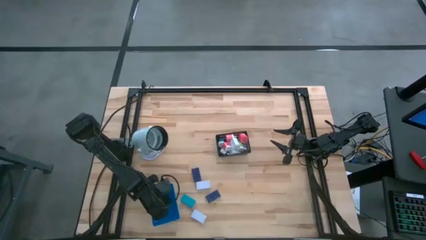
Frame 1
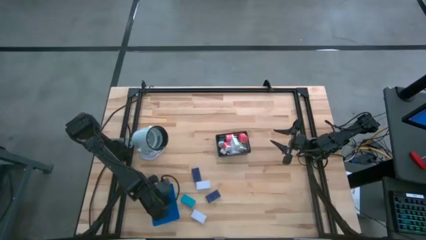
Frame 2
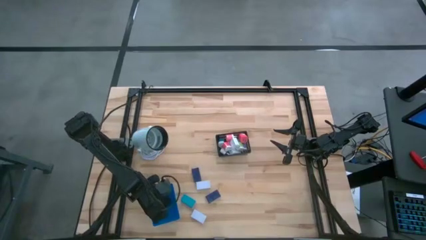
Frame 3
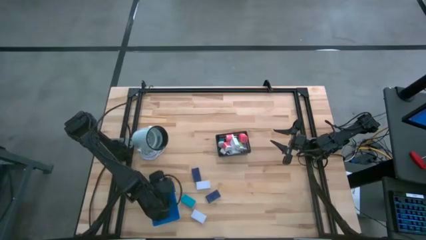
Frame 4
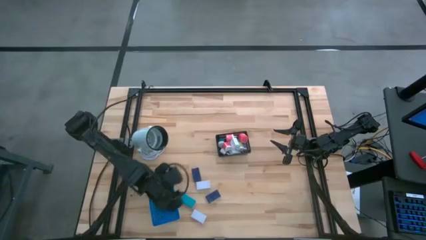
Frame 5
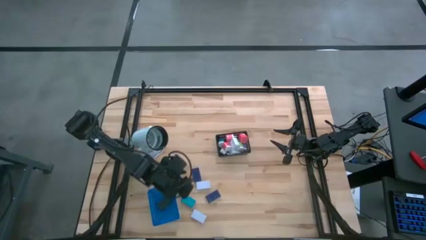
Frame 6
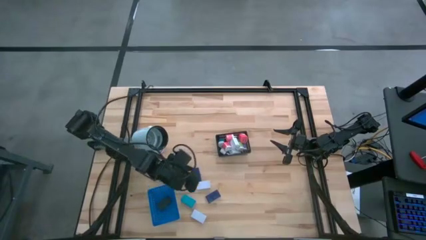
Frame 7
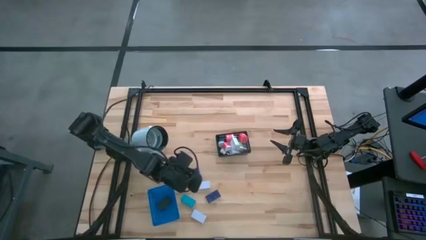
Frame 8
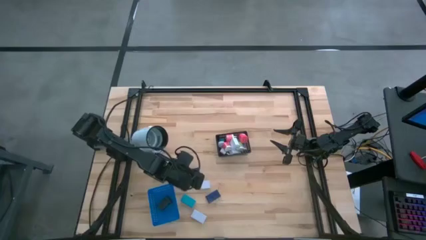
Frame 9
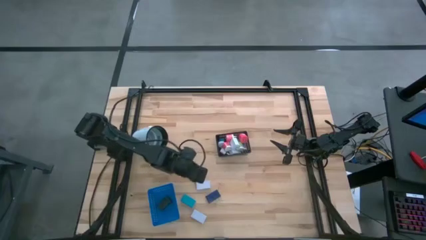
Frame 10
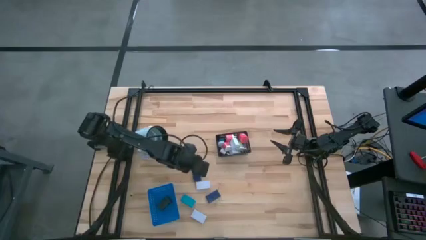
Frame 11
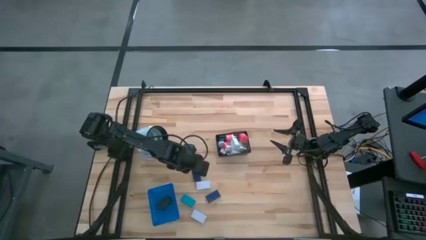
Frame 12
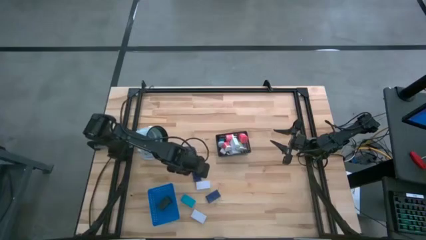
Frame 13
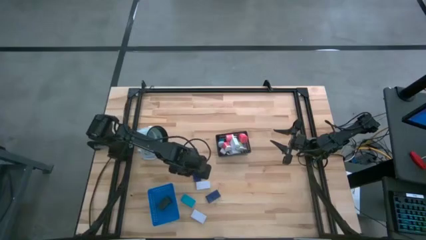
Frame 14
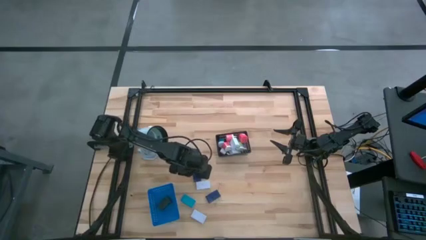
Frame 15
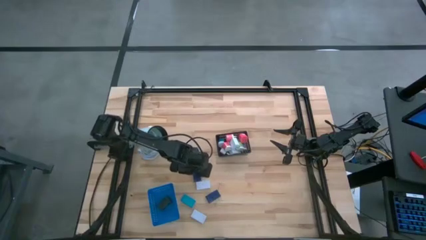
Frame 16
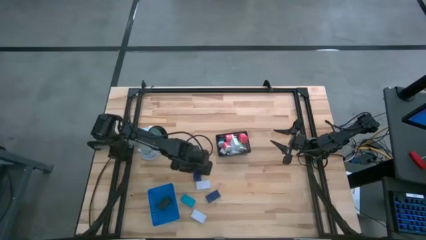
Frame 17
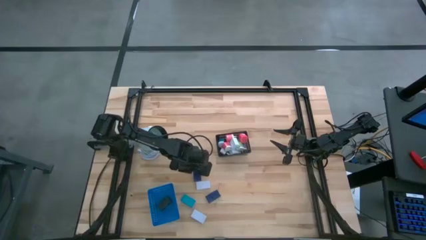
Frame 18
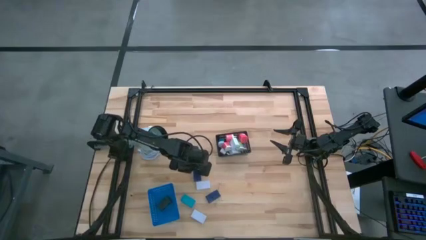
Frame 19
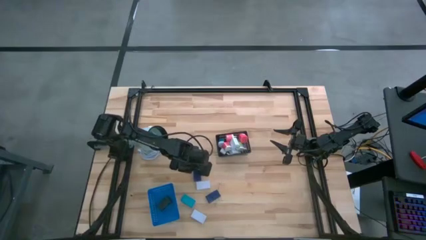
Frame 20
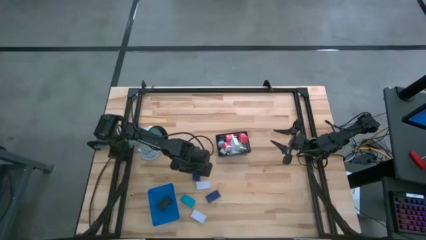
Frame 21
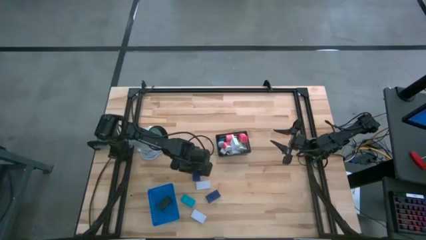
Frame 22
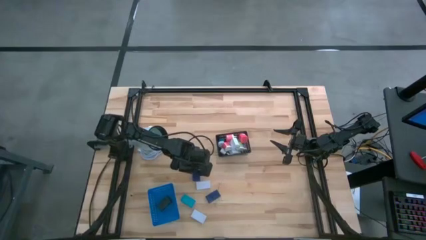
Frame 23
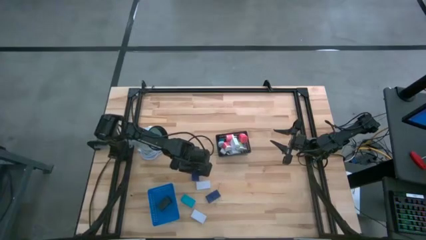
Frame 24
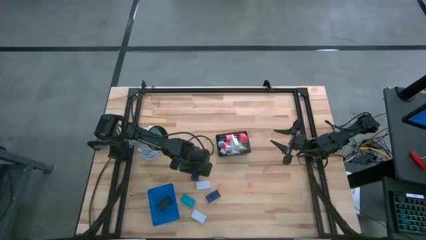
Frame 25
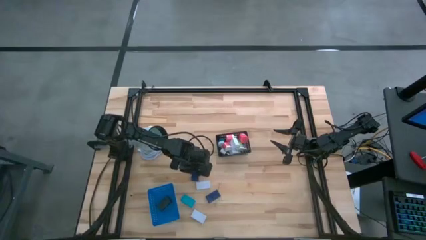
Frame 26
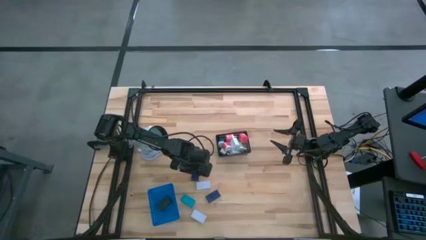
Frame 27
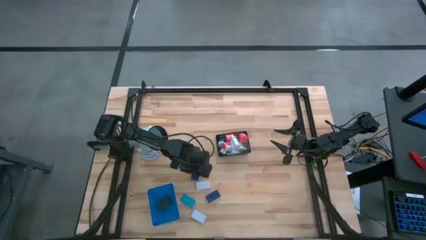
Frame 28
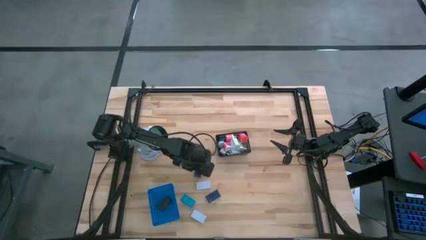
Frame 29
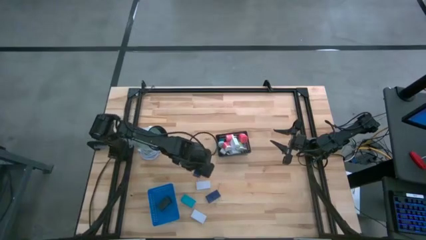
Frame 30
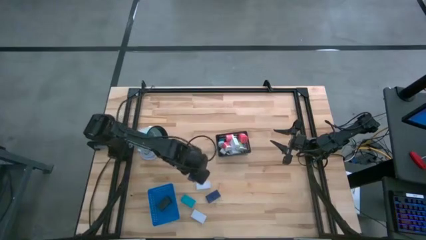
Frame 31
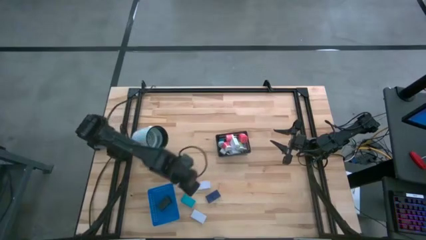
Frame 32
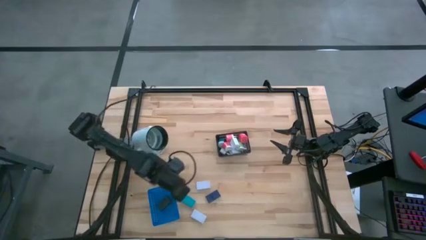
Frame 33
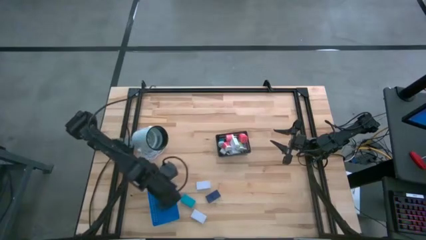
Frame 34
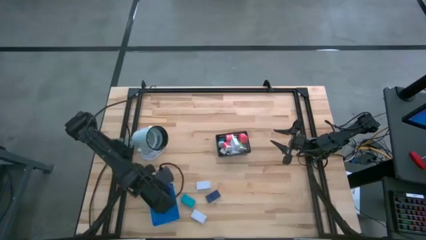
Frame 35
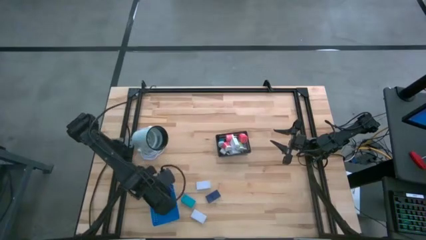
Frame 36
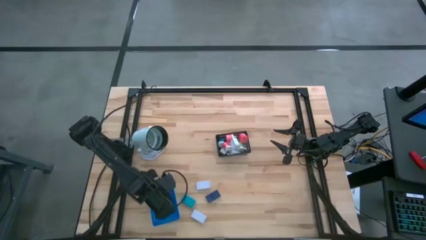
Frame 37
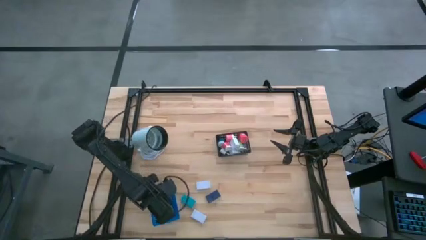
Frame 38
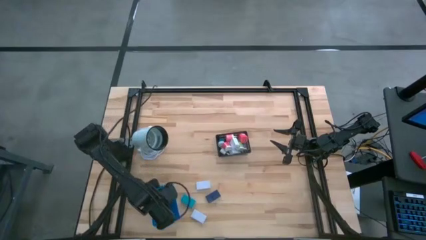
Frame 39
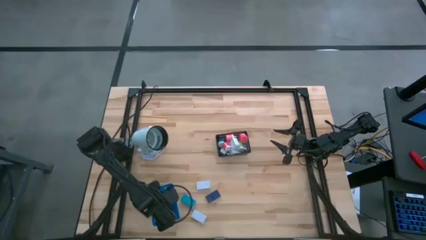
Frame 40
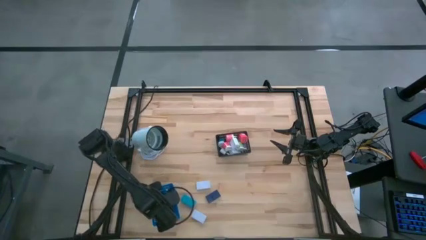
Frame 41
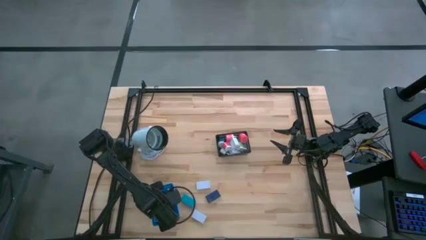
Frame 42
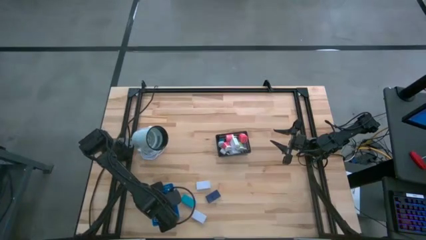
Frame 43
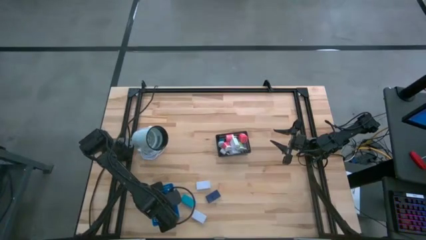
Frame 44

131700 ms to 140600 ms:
Task: Pick & Place Office items
Put the top blue digital timer into the blue bin

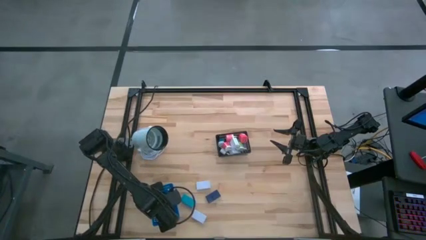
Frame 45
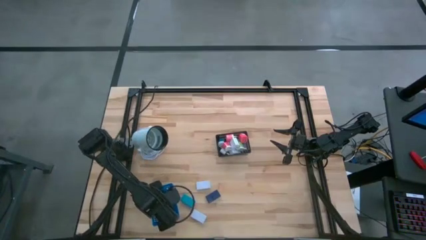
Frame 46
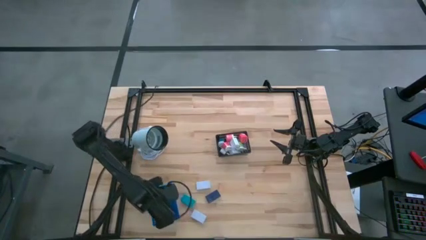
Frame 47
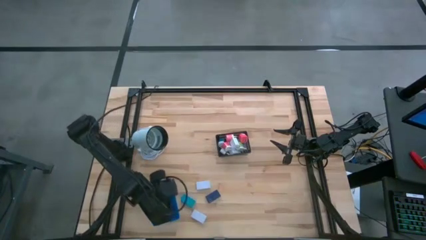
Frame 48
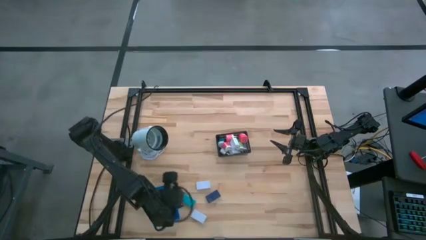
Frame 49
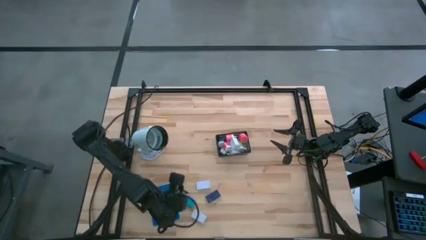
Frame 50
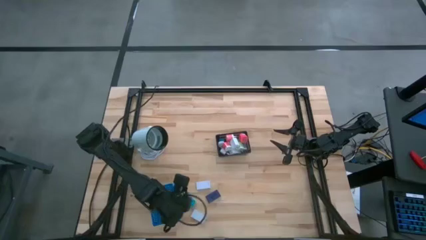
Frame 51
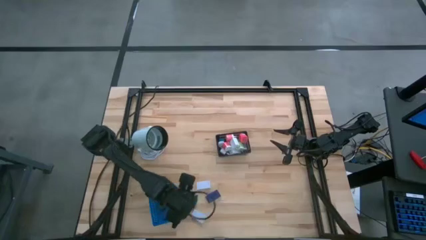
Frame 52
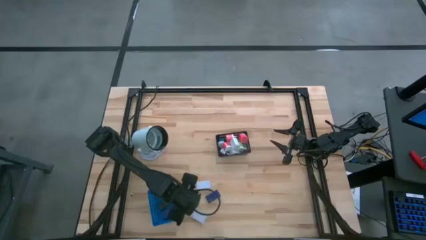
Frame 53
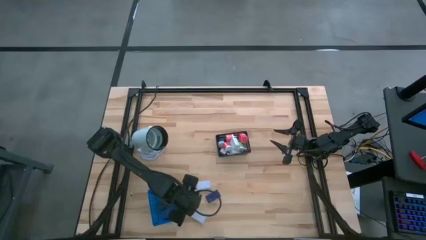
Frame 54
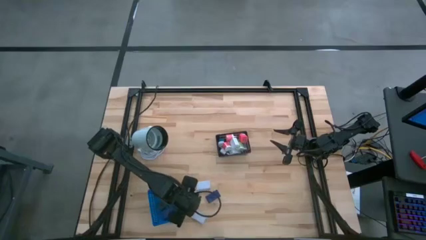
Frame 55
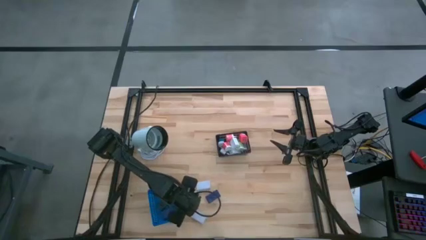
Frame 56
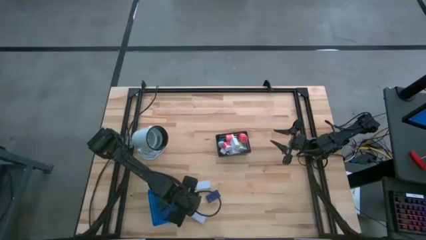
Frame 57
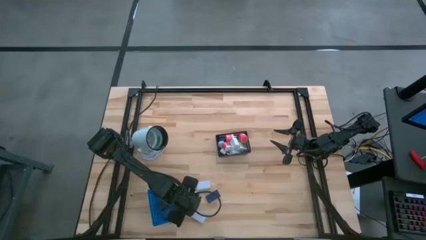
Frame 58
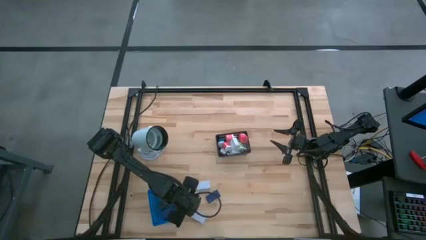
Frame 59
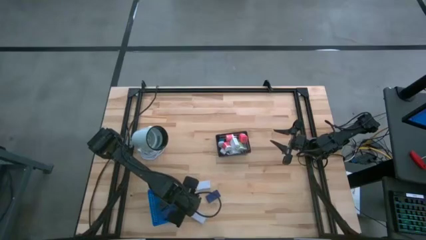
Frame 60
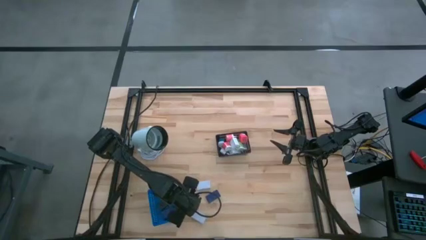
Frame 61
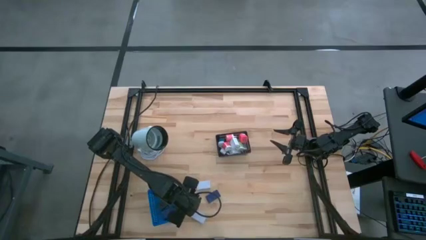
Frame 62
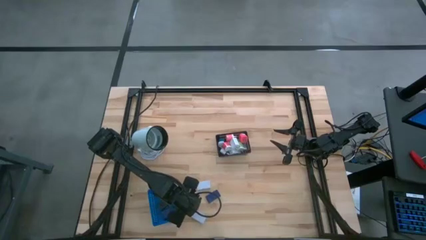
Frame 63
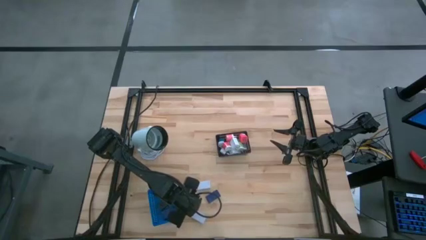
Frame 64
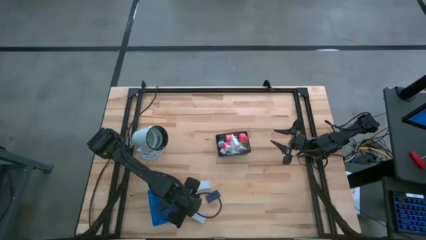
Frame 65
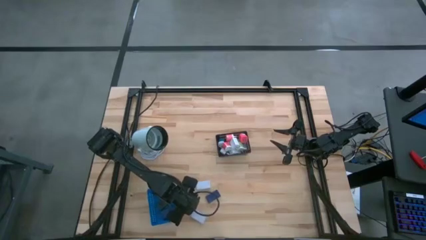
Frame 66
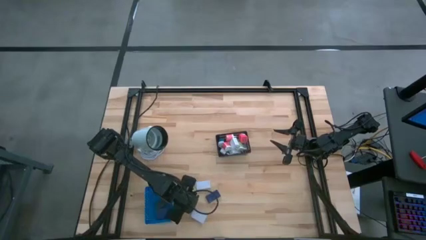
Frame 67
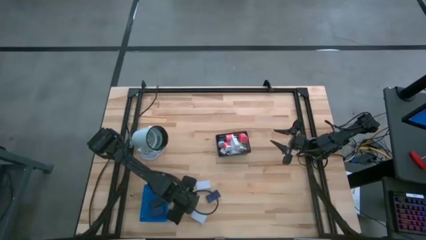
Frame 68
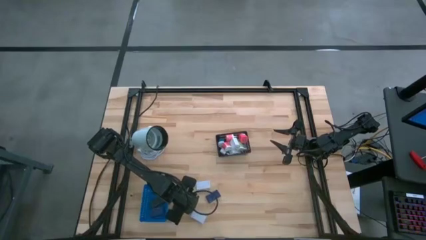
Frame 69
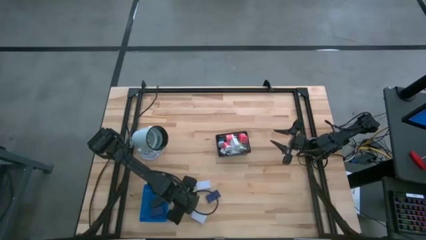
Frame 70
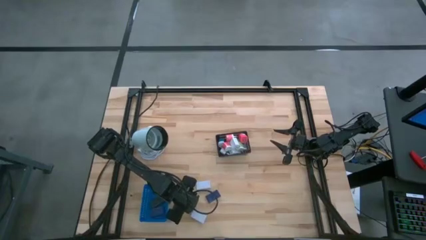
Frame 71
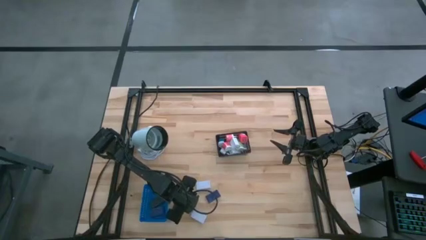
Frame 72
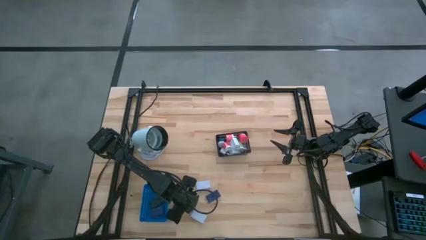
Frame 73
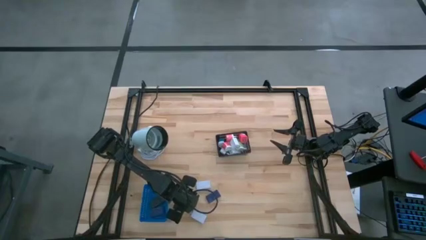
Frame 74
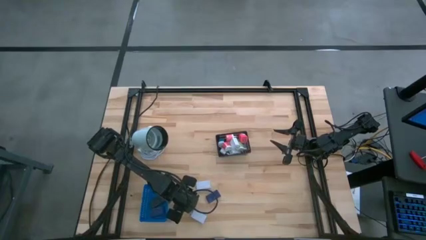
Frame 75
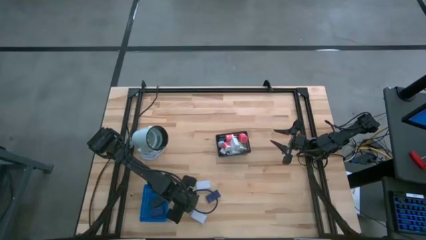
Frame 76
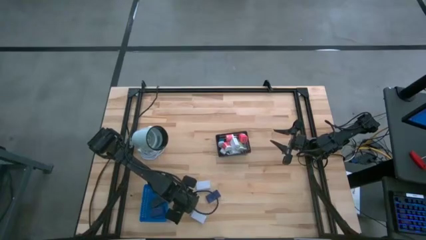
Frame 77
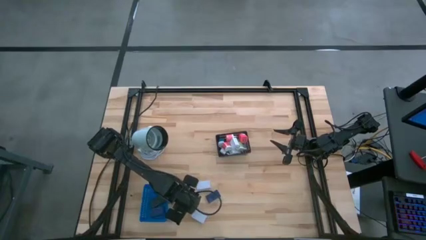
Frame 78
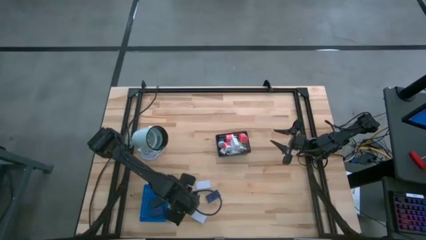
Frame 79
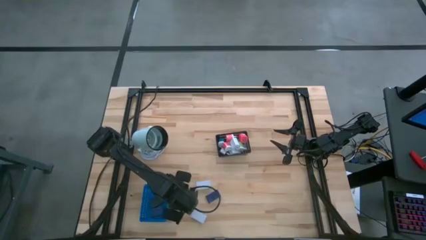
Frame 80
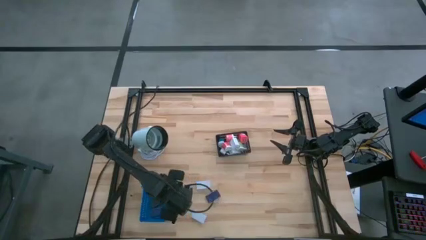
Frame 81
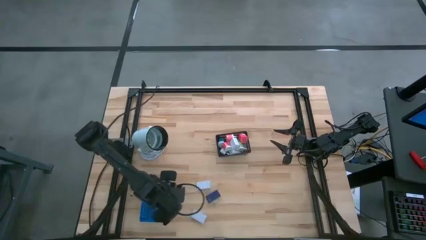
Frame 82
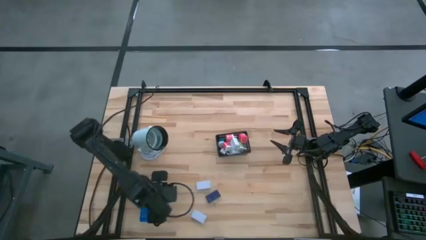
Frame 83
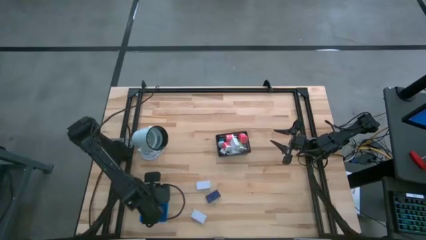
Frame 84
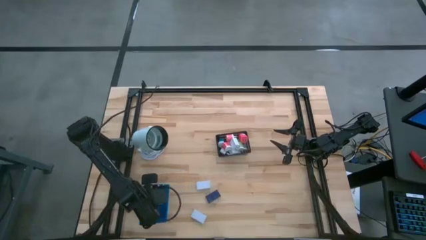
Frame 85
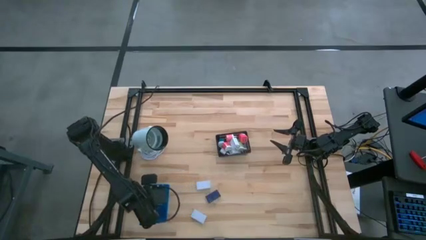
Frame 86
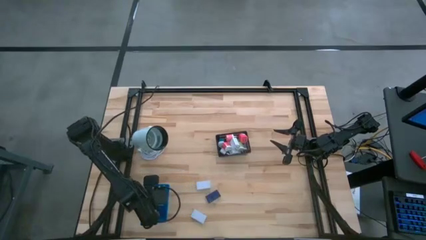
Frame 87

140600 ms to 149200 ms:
Put the light blue digital timer into the blue bin
